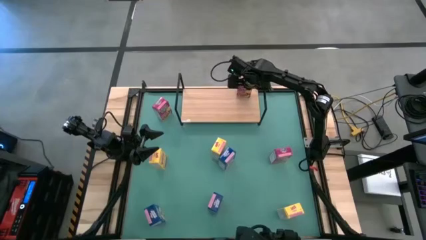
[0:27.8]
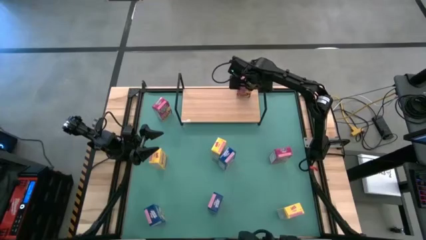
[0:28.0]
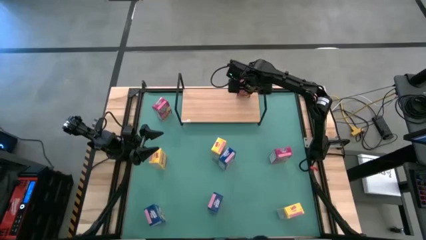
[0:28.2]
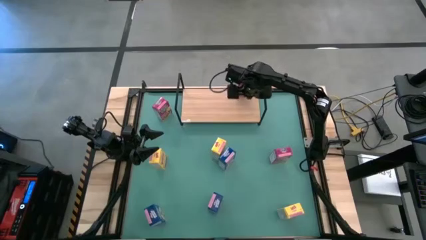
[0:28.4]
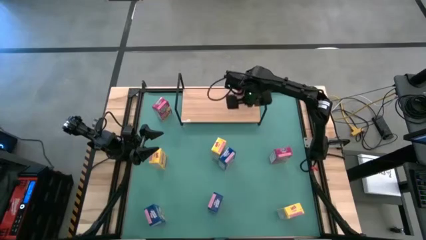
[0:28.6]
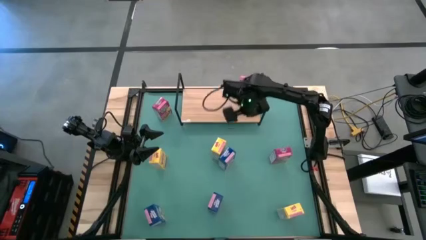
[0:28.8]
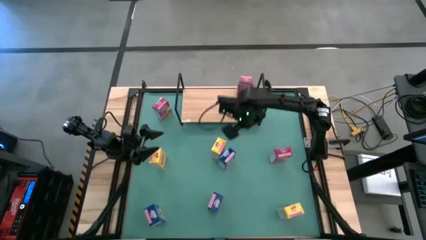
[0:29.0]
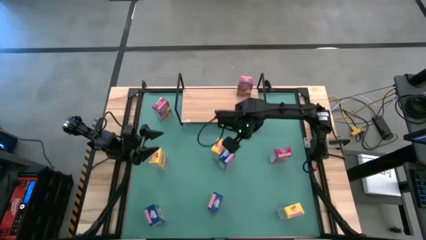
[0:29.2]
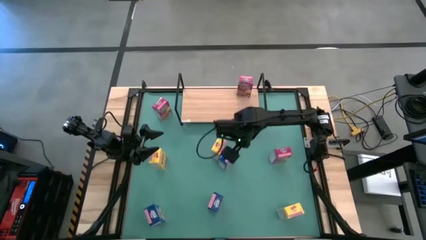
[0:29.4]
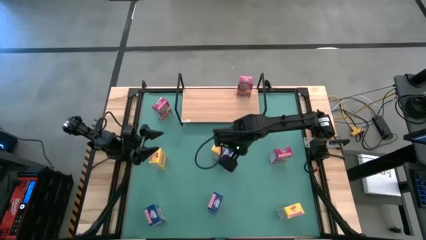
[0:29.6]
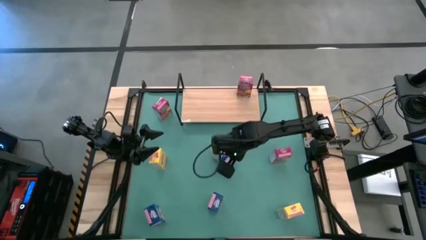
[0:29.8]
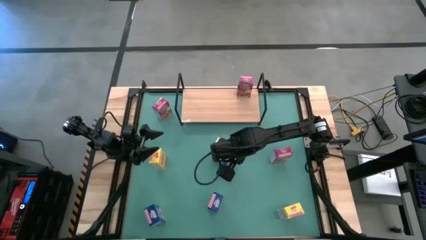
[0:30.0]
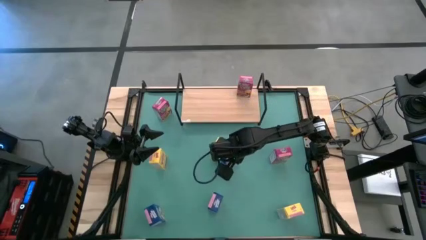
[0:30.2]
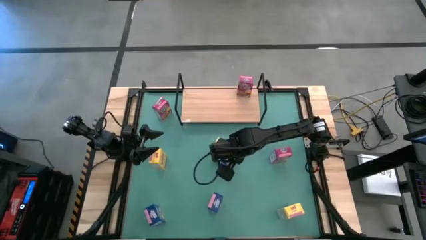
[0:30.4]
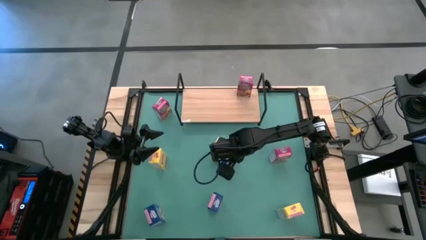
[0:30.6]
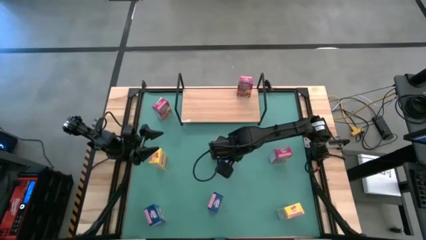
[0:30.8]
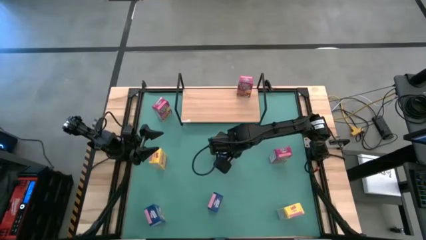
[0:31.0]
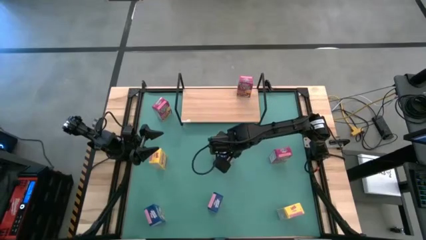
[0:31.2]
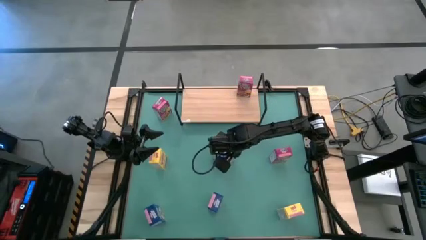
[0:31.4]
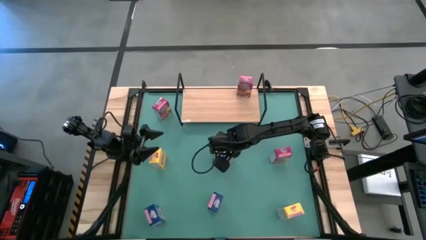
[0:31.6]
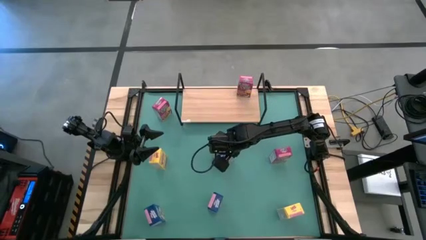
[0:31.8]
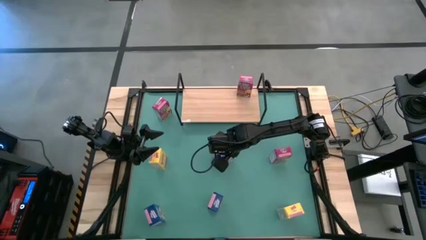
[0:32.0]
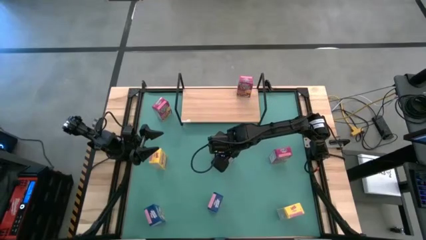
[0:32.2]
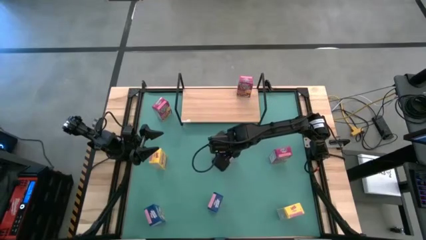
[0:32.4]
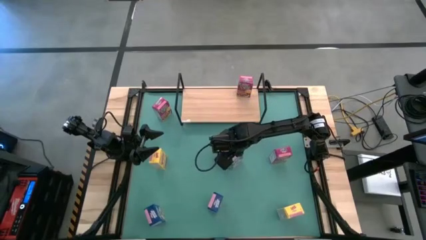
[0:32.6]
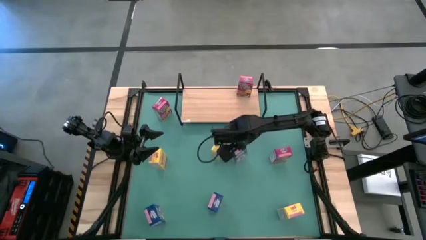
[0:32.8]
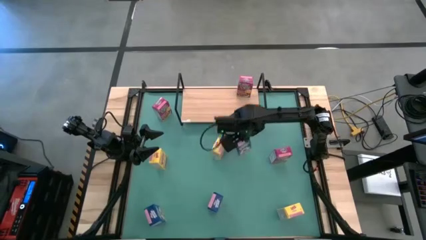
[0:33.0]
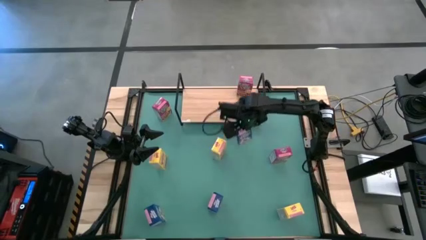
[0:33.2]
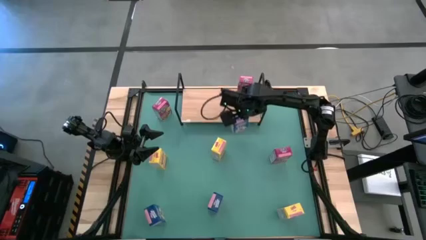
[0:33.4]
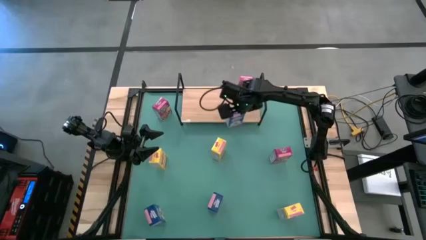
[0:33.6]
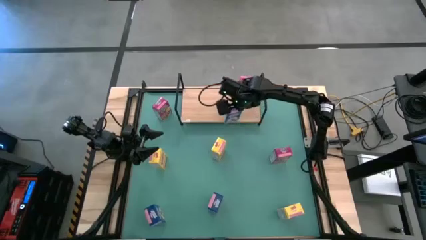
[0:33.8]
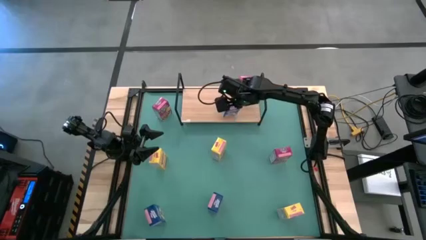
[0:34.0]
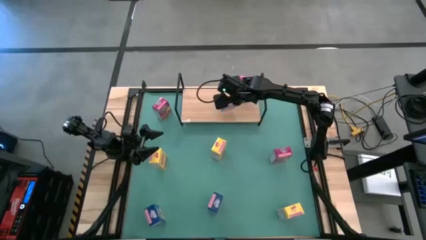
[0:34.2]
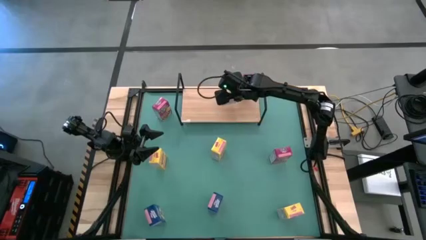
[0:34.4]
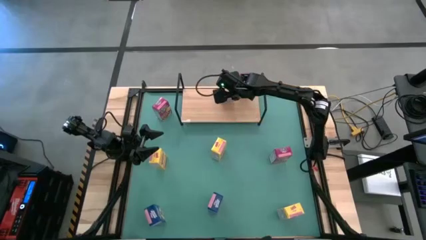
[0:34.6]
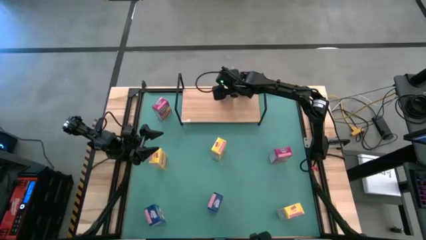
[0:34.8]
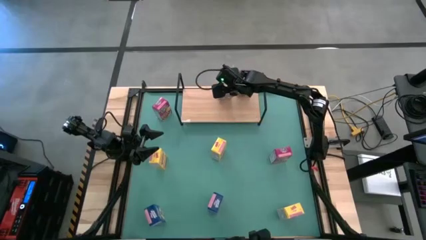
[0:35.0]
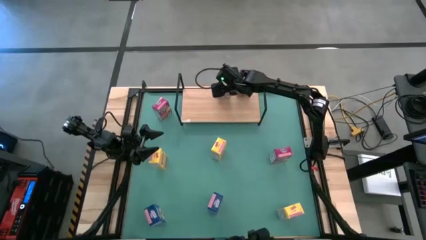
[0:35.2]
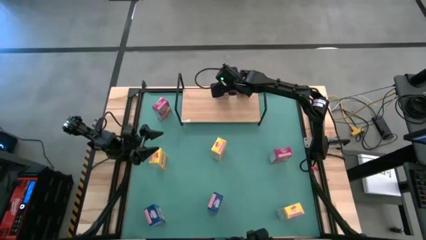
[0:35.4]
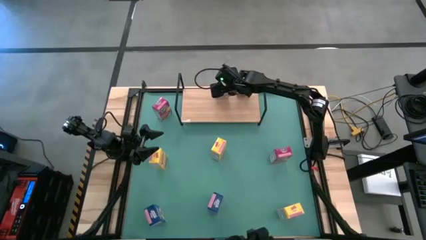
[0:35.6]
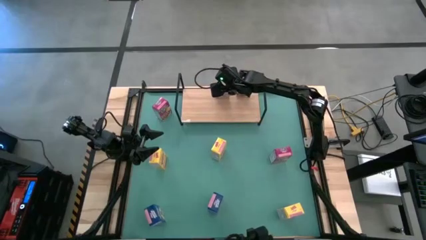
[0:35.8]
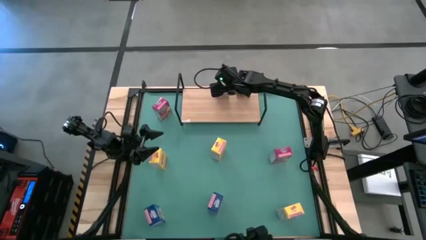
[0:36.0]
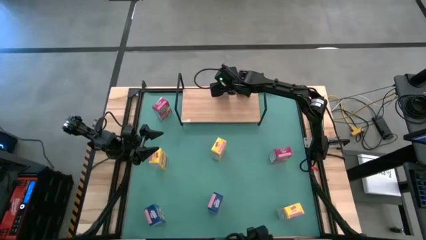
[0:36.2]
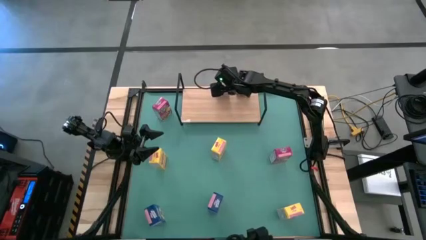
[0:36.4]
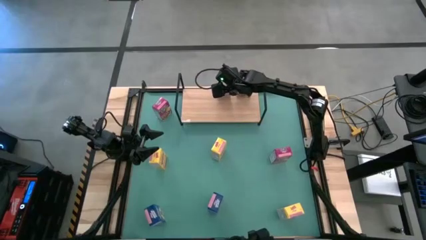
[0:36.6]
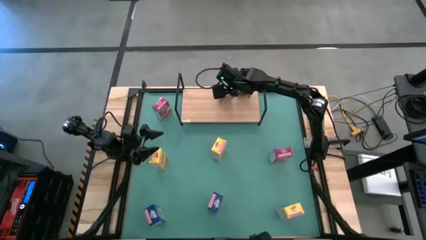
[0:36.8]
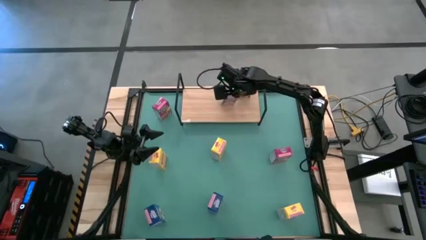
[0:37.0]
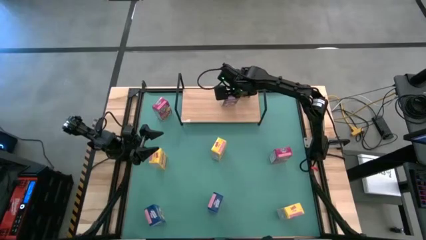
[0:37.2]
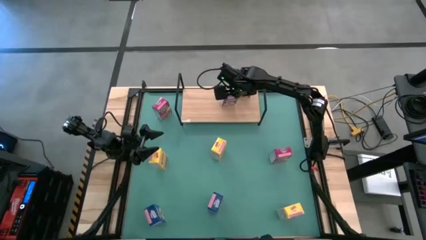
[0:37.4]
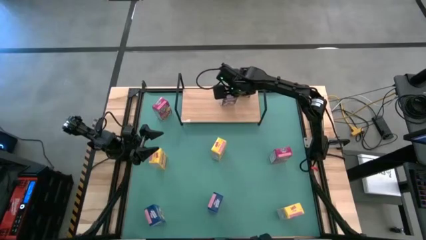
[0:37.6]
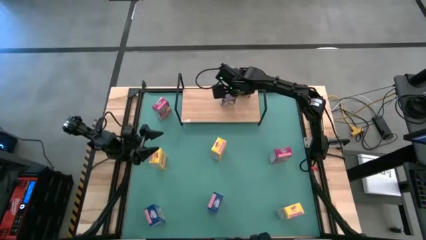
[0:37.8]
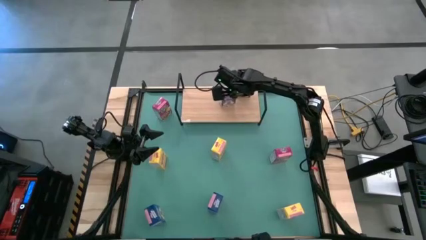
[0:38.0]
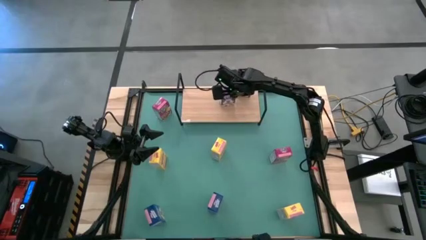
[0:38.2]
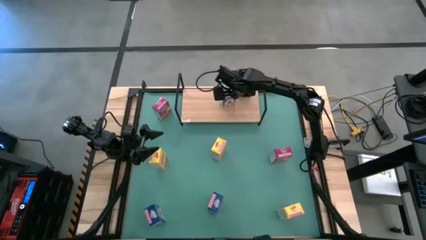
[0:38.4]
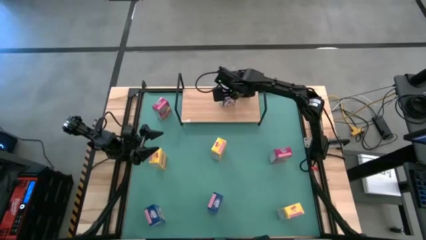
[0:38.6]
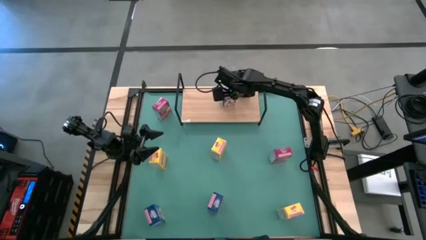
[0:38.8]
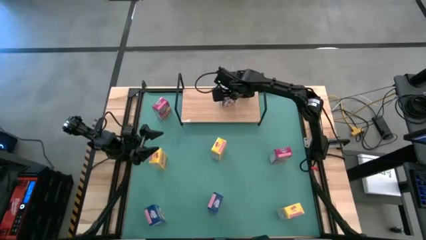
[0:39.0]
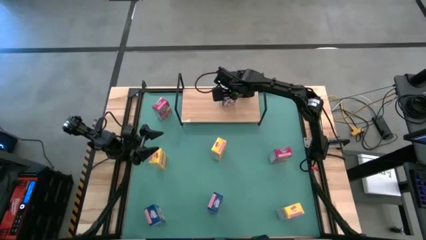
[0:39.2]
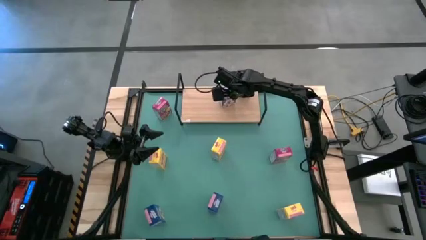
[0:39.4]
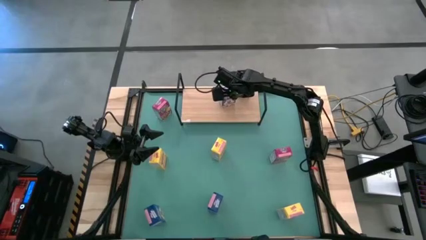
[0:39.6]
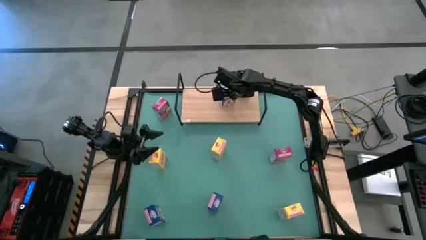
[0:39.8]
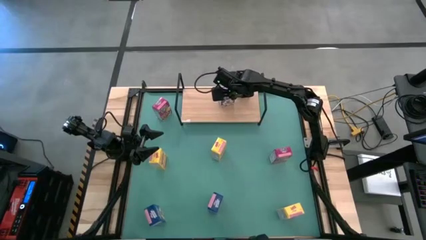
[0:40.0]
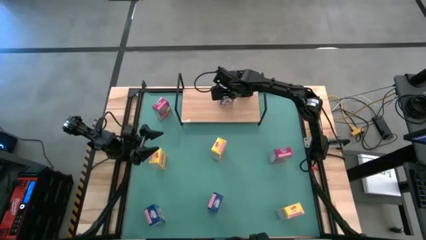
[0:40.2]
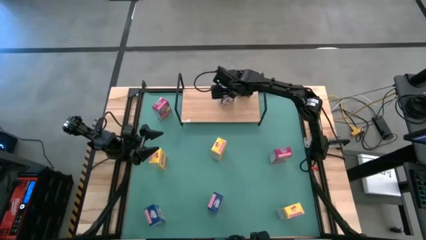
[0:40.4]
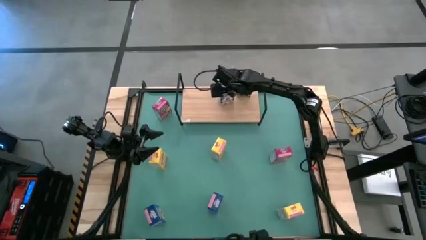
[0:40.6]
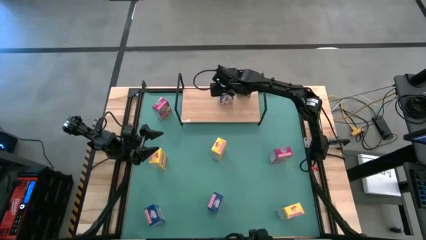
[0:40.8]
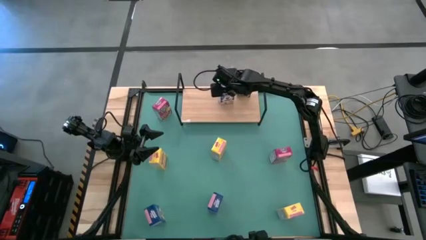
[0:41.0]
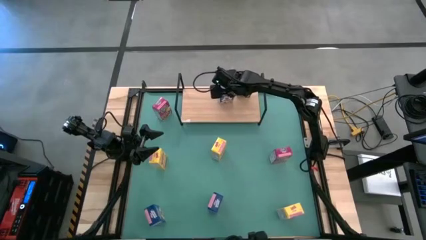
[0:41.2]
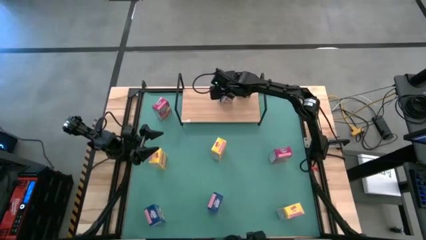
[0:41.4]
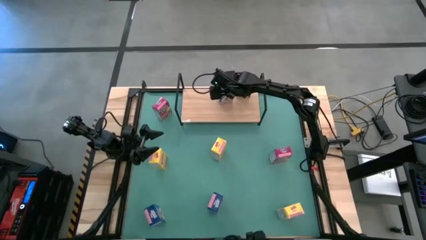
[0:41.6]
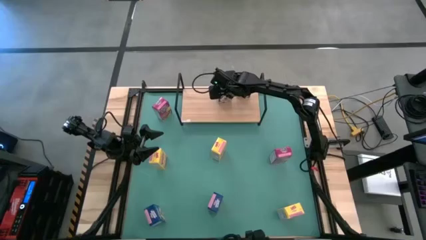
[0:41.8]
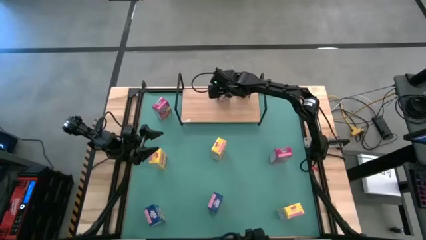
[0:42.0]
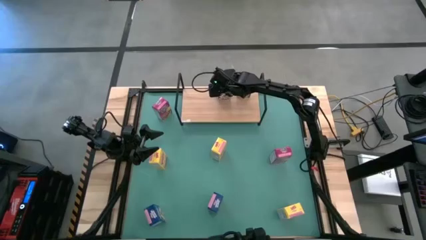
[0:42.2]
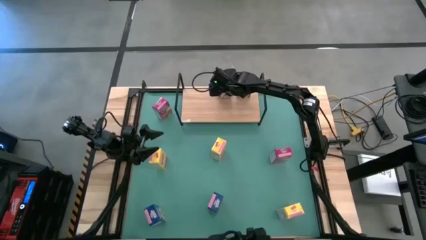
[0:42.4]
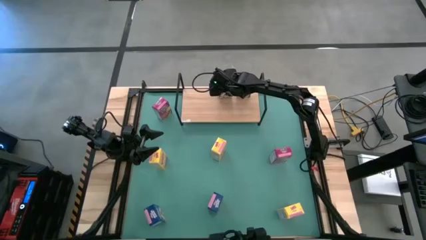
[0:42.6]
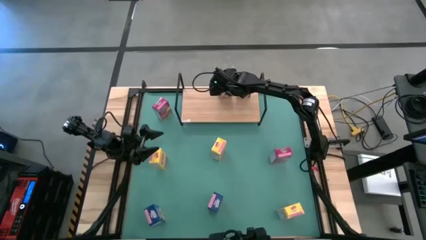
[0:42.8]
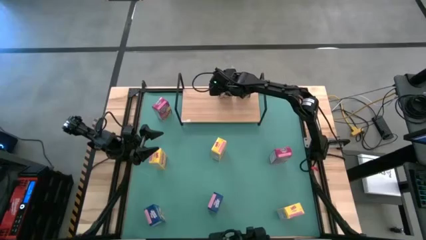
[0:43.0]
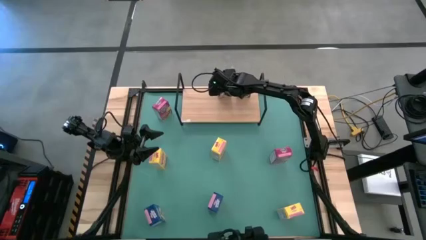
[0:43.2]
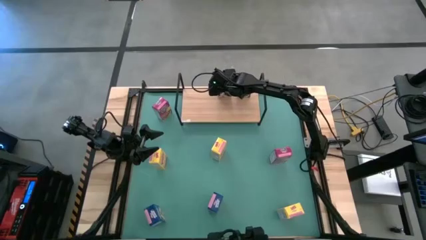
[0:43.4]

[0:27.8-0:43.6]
Task: Stack cereal on shelf
Put the top blue cereal box on the shelf

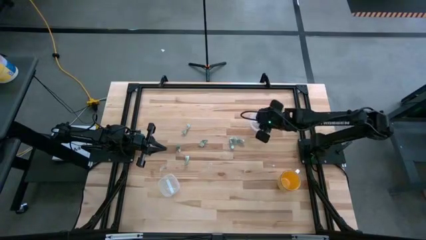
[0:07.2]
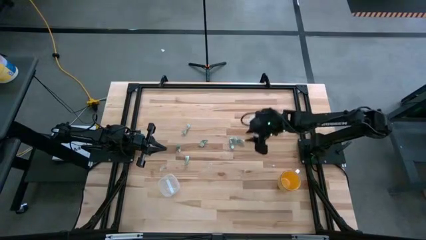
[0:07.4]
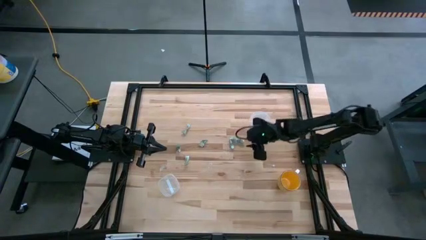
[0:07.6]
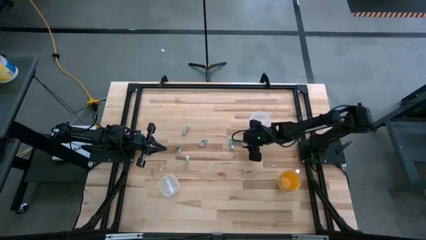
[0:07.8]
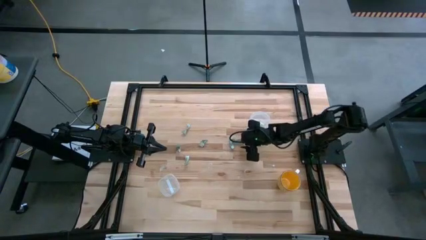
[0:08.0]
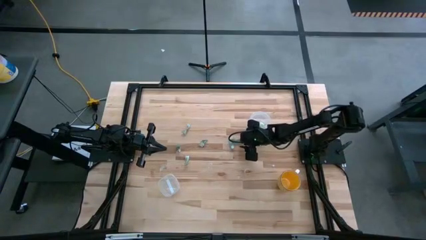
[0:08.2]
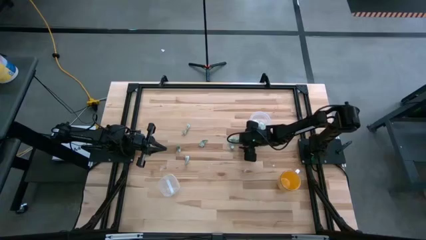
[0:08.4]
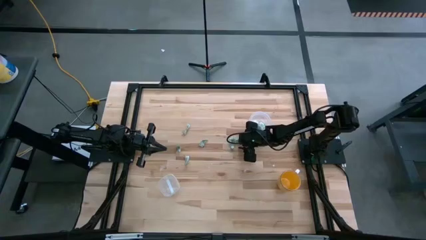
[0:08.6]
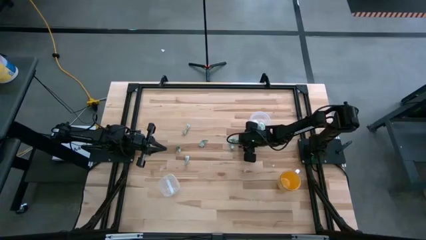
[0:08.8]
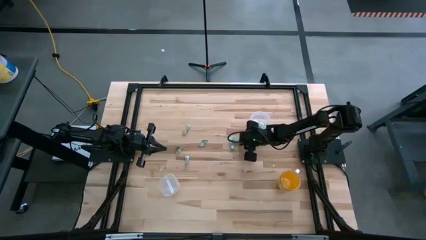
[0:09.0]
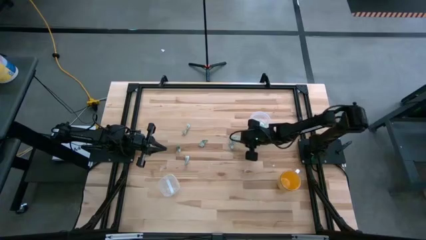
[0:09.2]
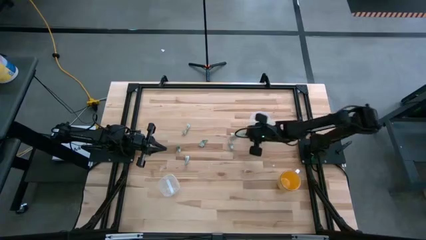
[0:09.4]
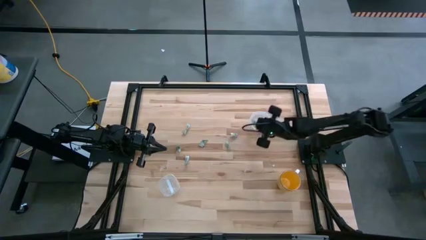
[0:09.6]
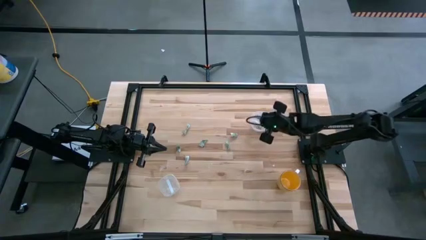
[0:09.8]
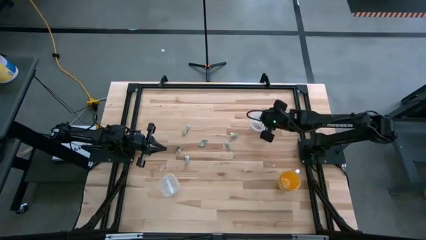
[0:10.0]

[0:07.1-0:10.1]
Task: Pick and place Stevia / Truvia into bins
Put the stevia packet into the round transparent container
